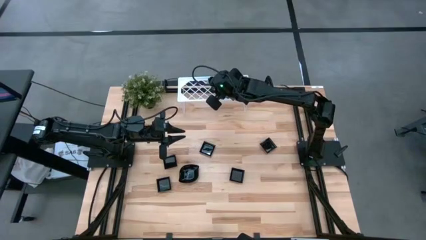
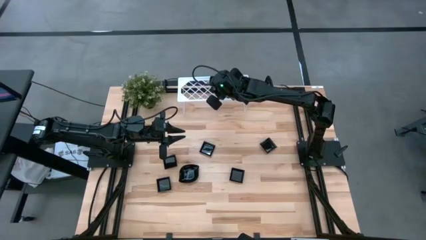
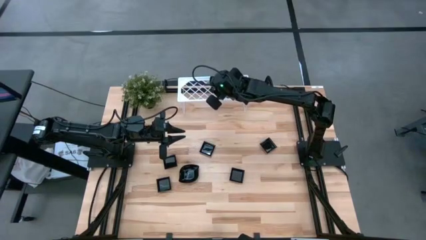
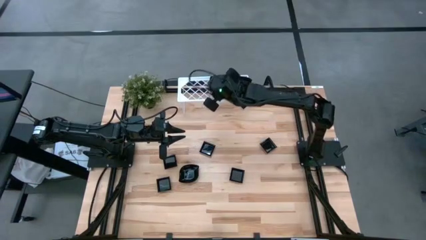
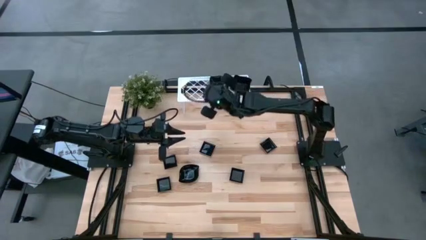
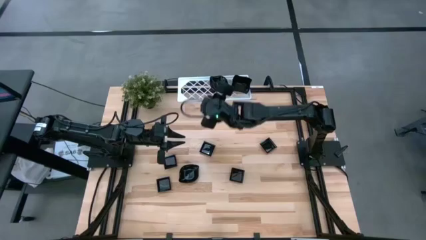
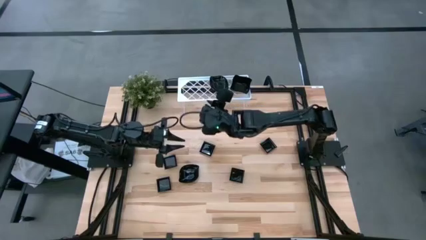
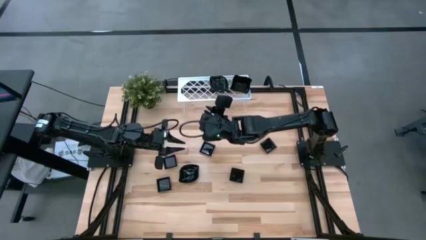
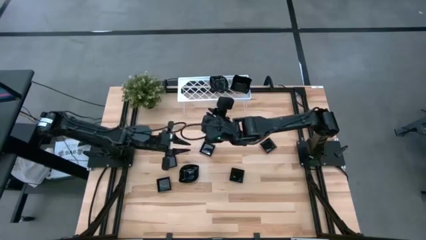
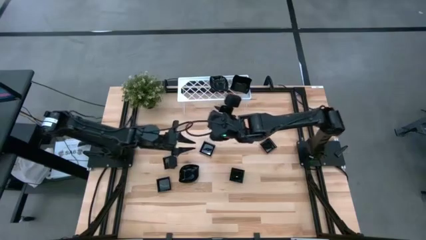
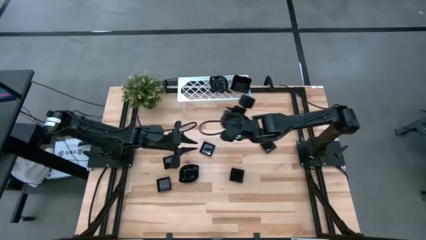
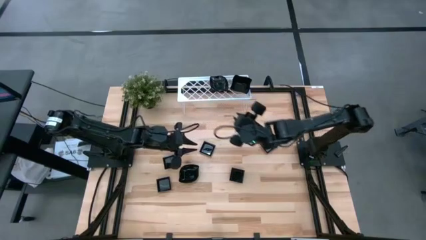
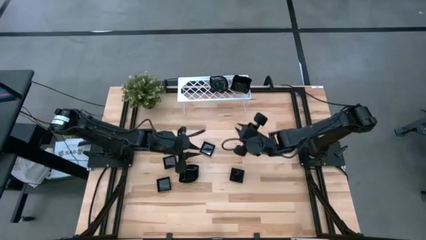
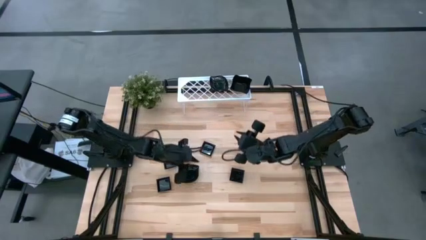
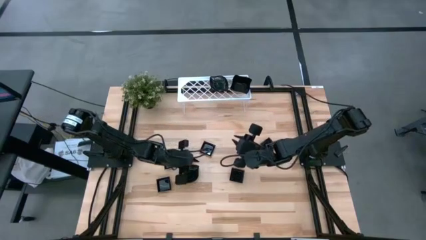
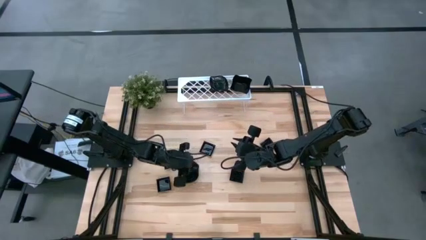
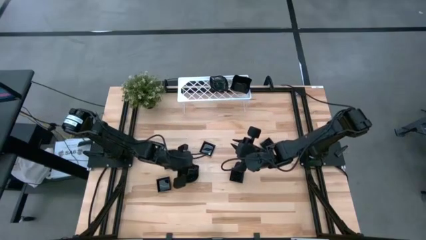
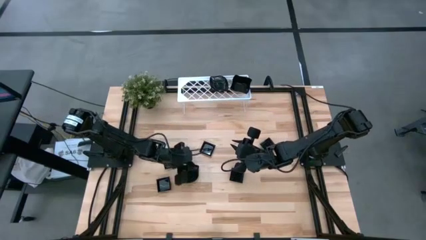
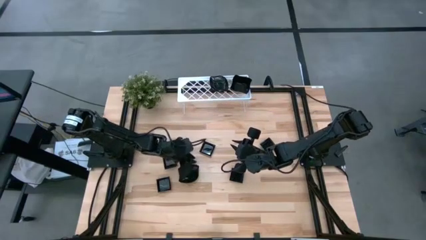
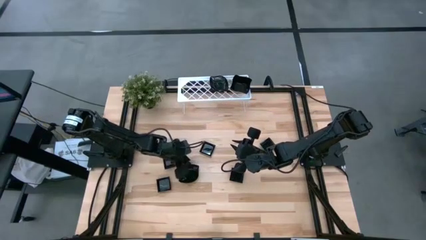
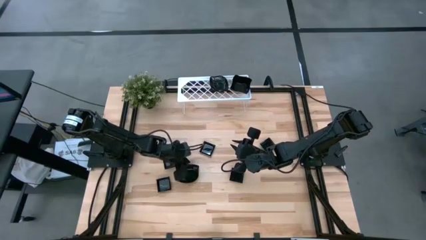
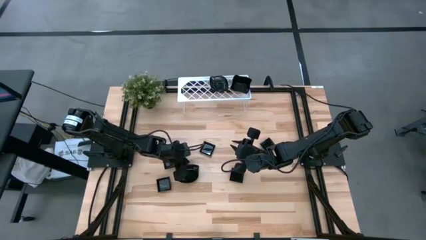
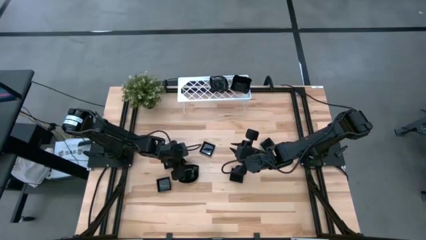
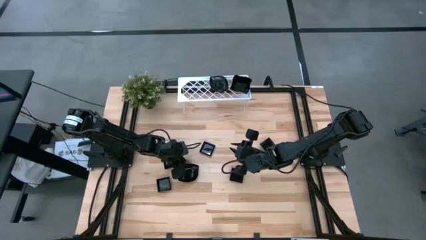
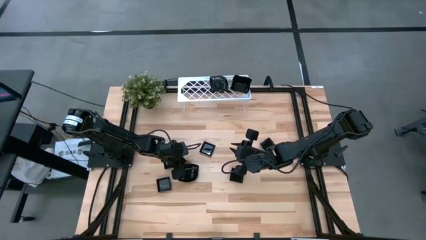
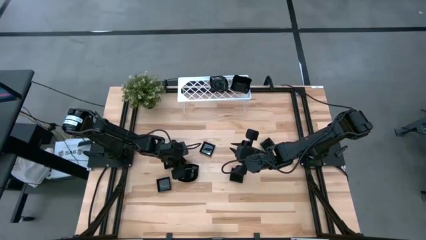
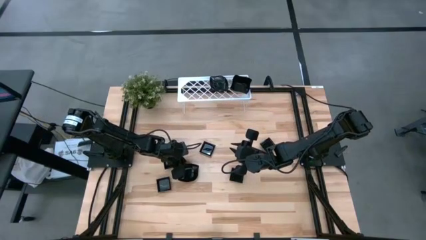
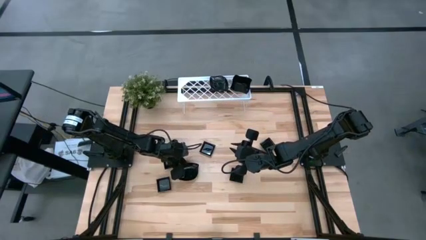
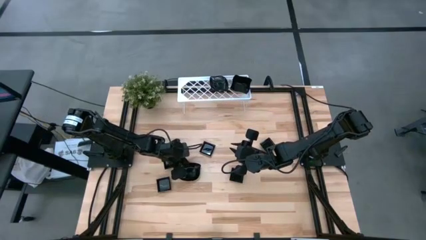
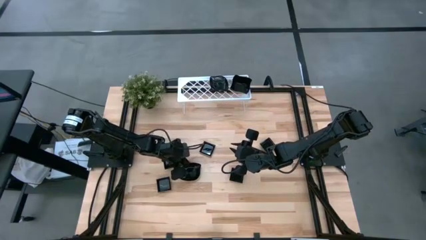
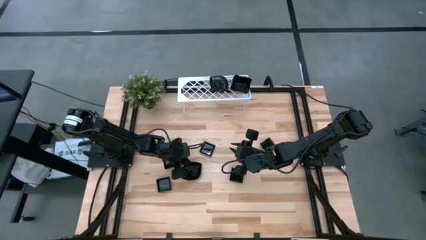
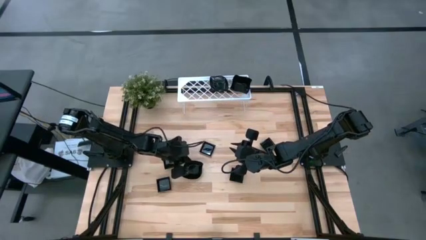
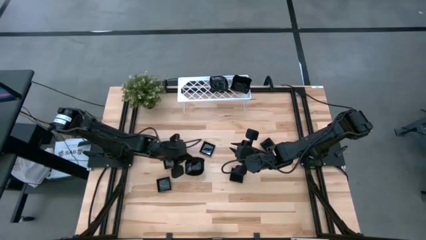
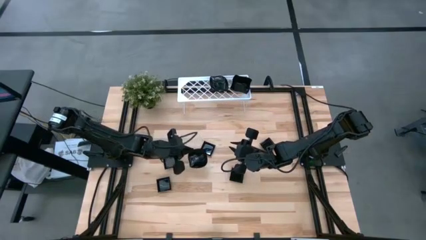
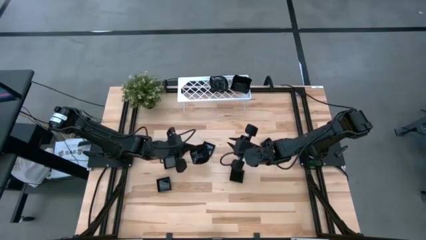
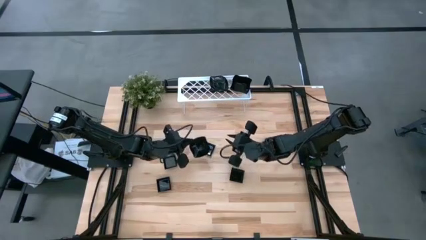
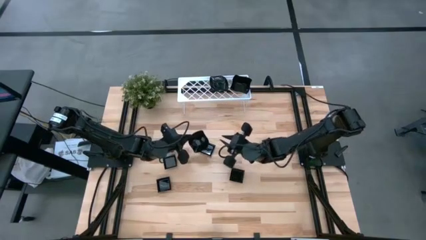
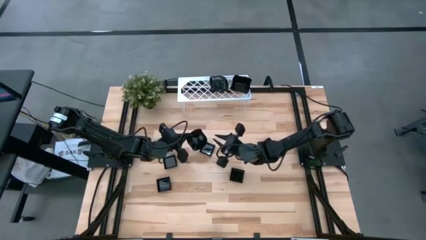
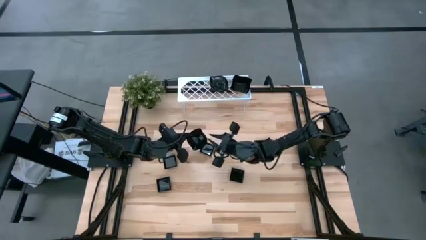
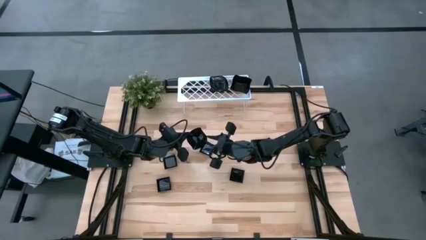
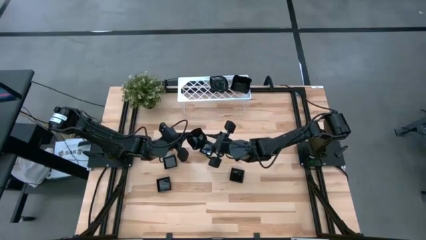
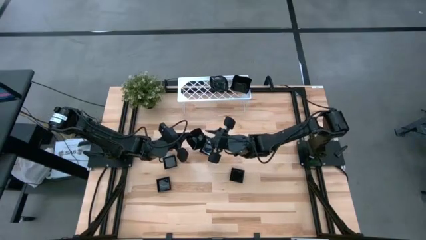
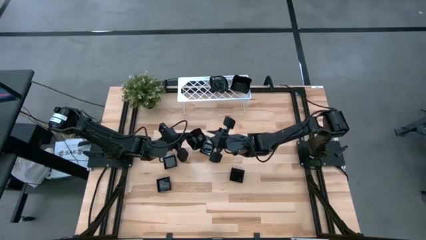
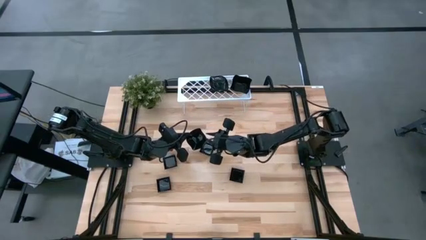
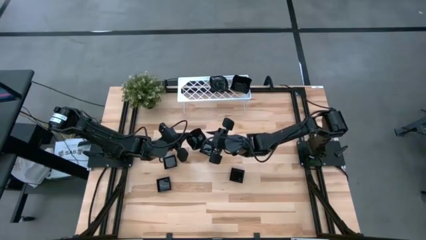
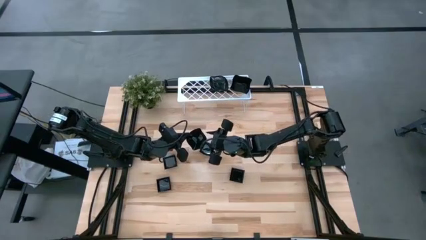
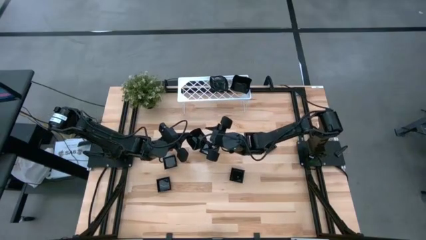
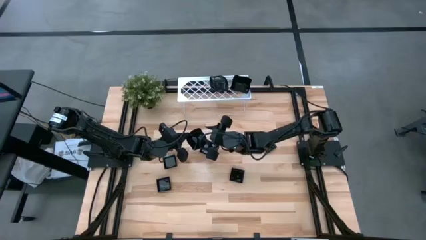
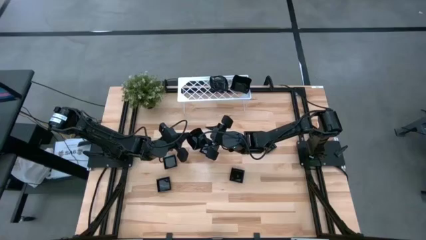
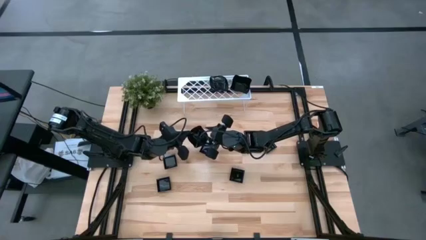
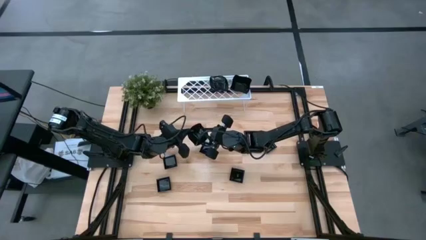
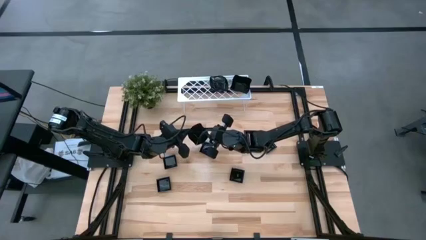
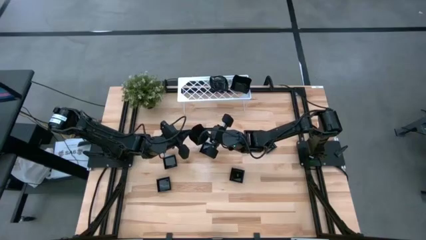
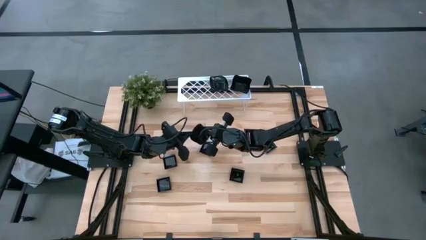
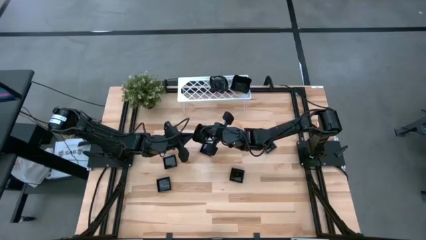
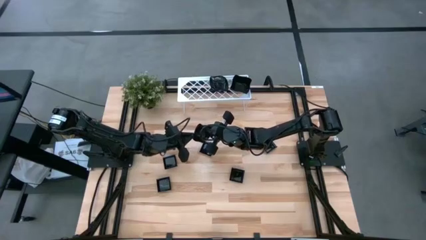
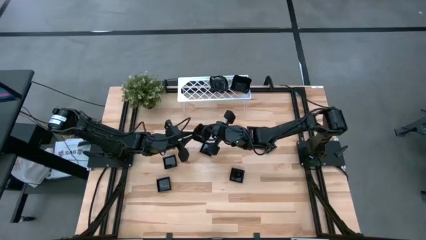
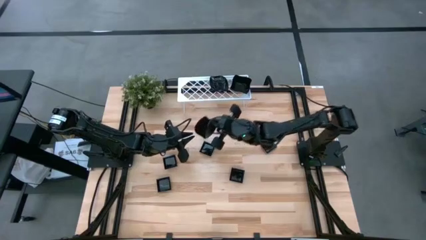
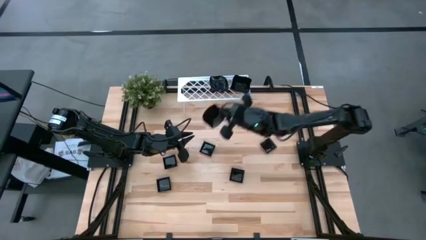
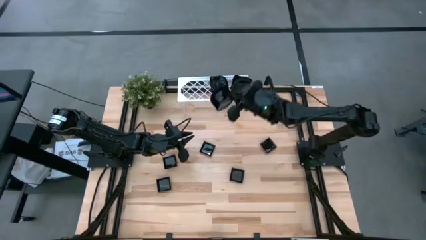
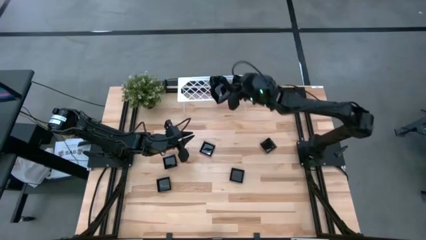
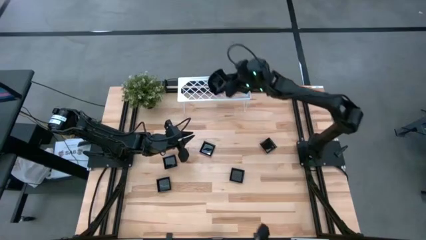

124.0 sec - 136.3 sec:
Task: Pick & Place Mini shaped plates
Stack the black leaf-shaped plate on top of the black leaf-shaped plate on the shelf

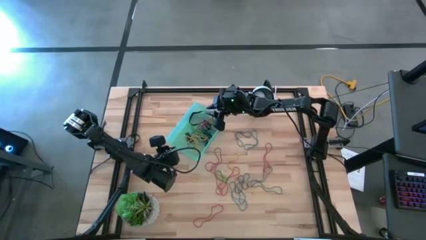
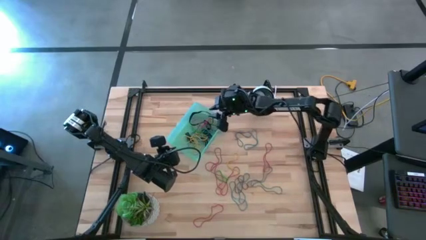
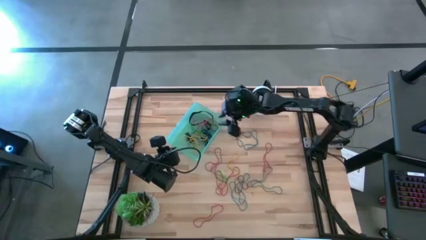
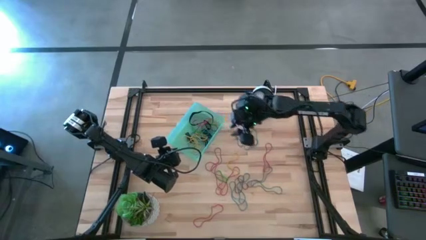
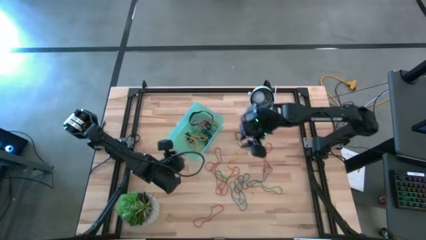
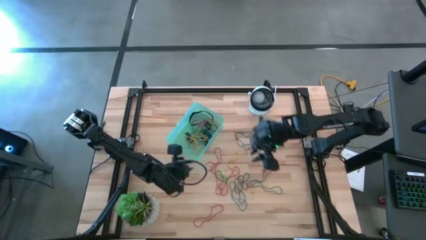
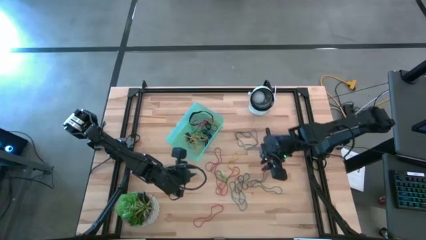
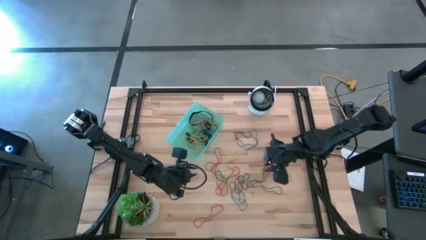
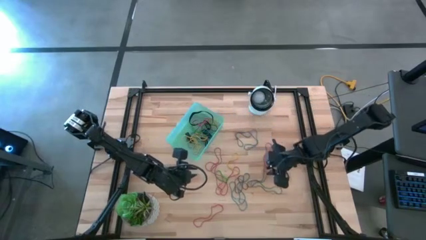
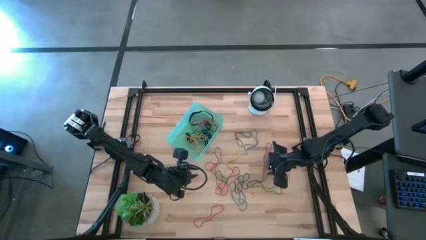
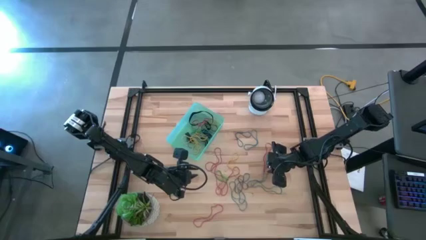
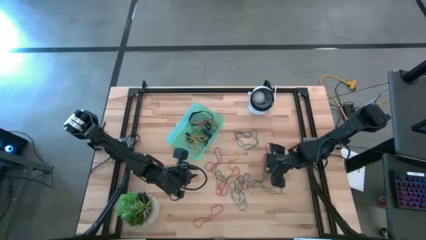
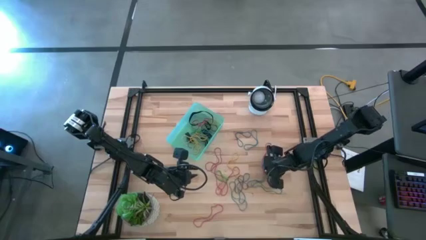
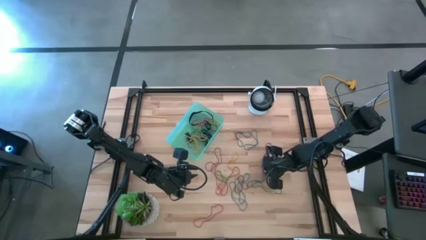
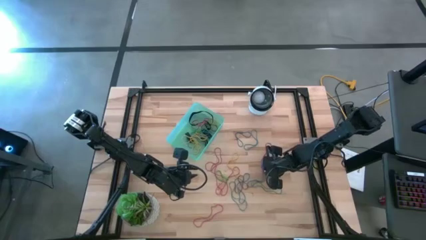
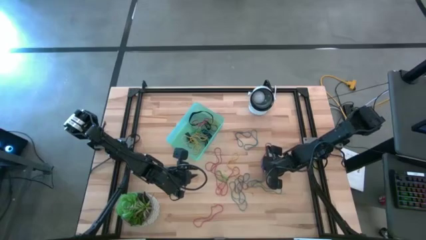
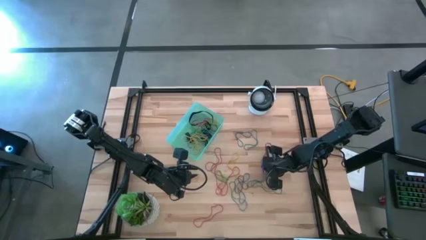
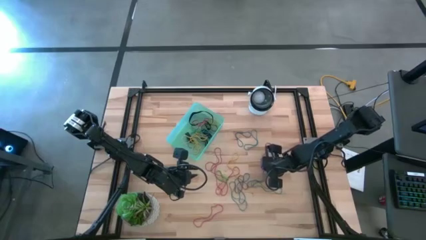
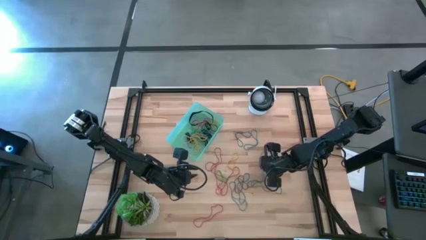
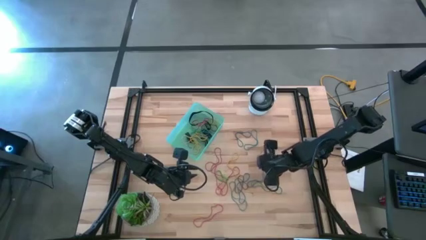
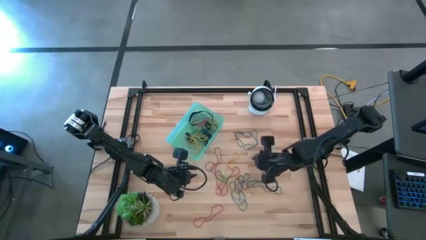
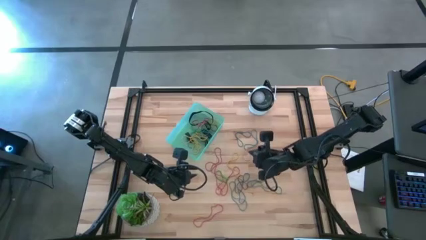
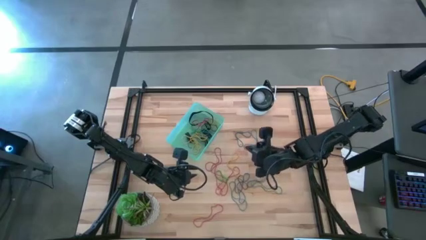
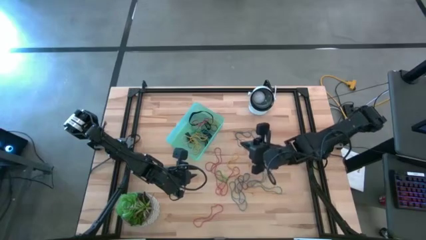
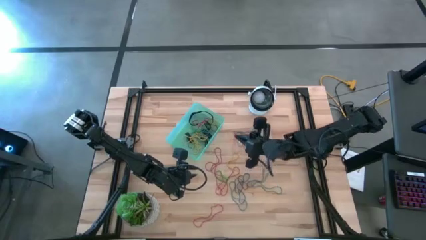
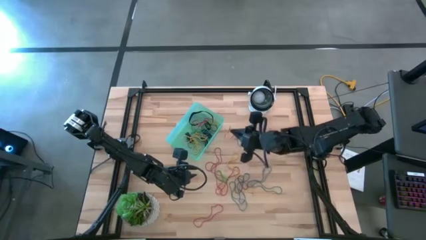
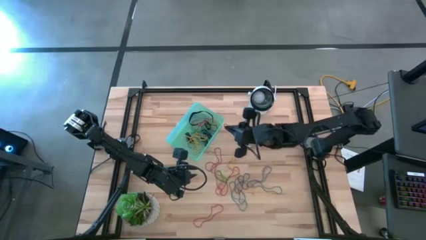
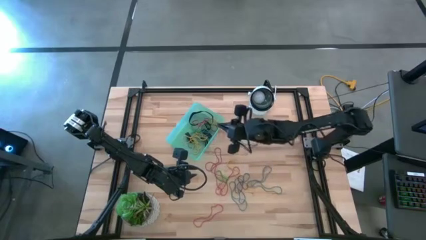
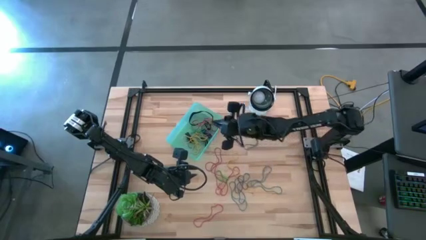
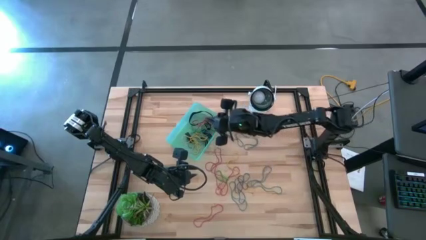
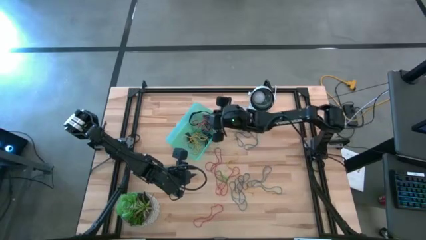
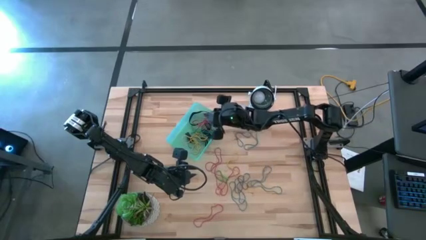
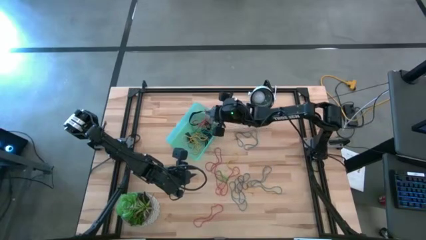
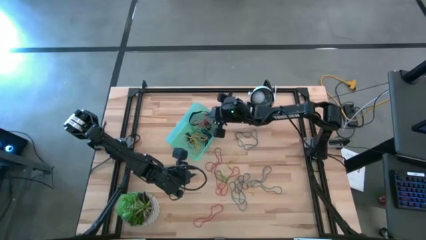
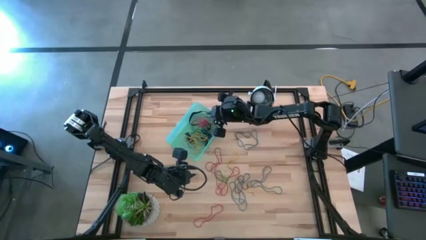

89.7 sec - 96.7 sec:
Task: Pick and place rubber bands into bin
Put the red rubber band into the green bin
